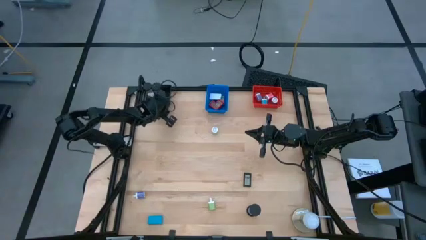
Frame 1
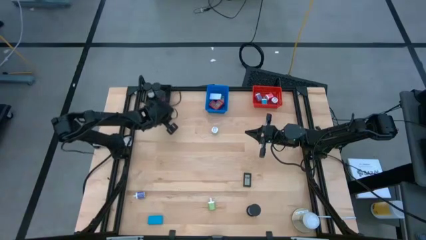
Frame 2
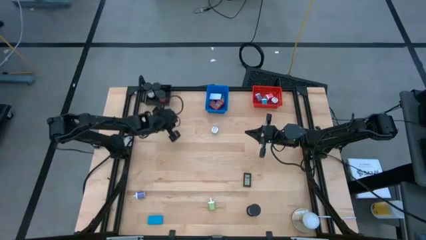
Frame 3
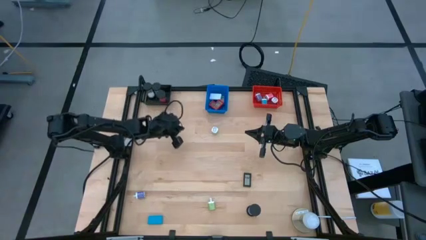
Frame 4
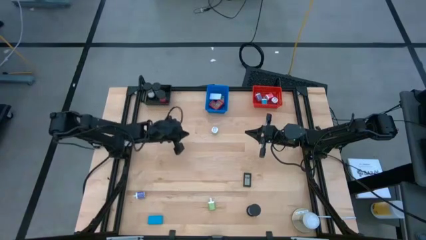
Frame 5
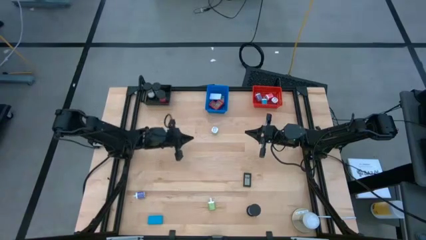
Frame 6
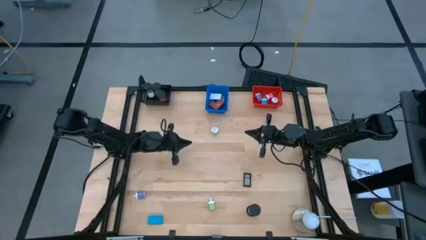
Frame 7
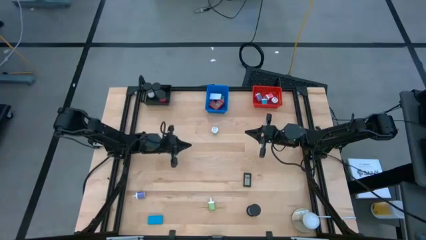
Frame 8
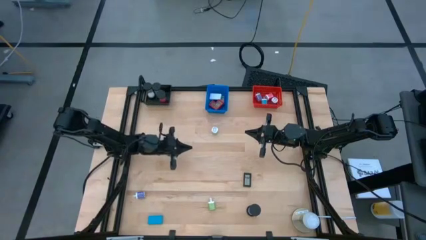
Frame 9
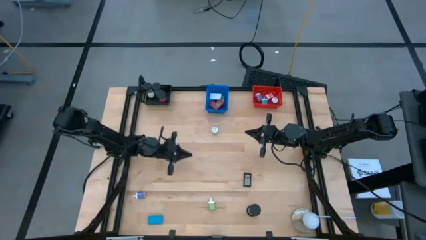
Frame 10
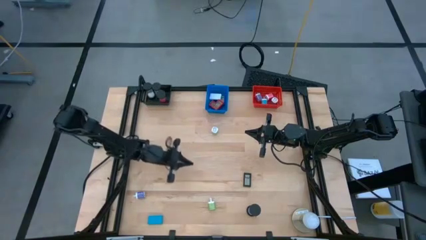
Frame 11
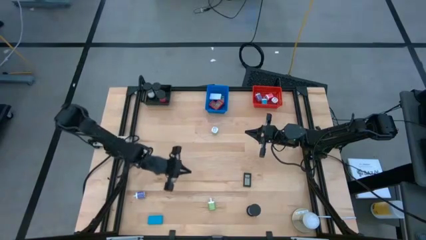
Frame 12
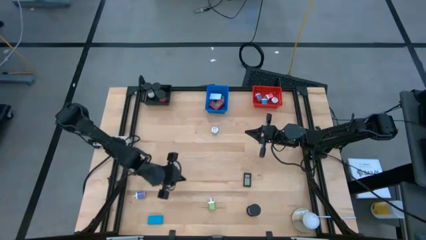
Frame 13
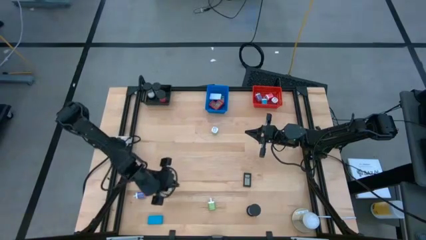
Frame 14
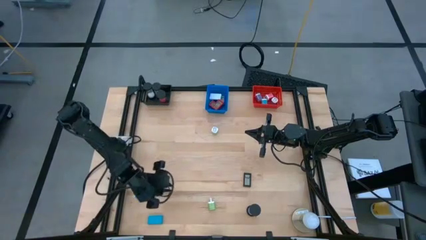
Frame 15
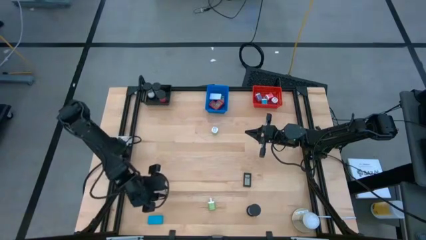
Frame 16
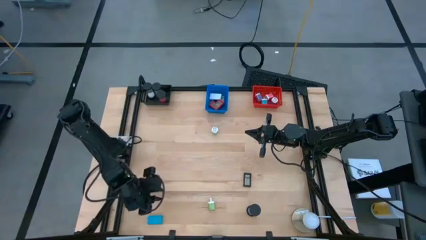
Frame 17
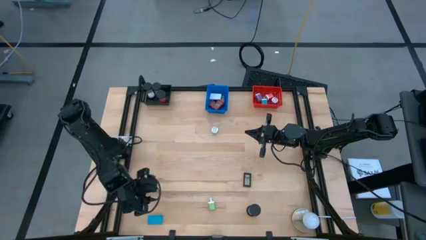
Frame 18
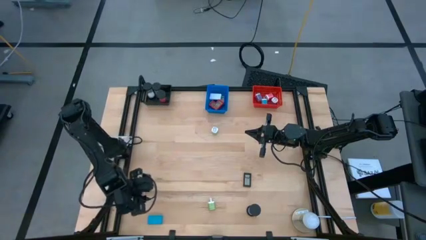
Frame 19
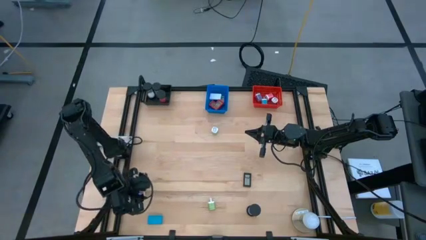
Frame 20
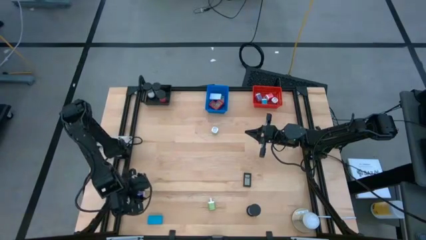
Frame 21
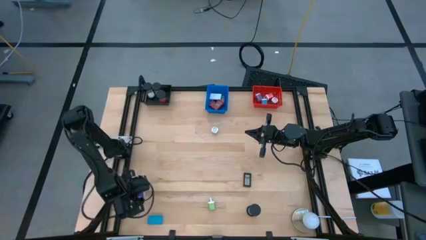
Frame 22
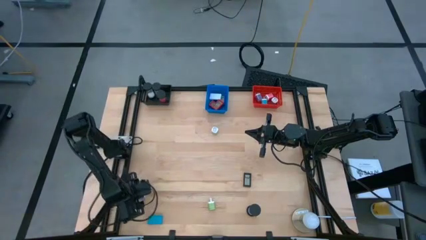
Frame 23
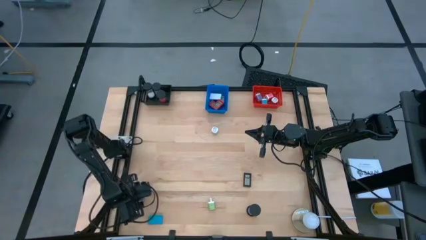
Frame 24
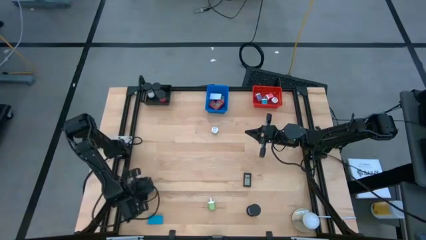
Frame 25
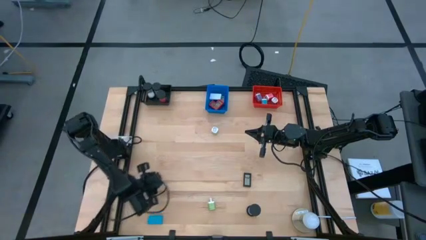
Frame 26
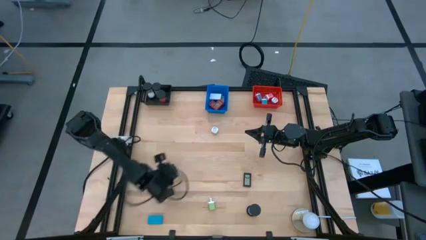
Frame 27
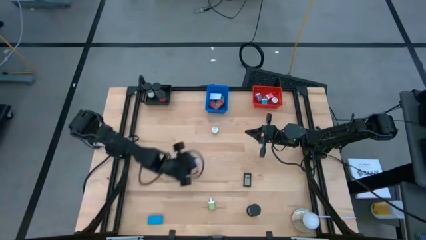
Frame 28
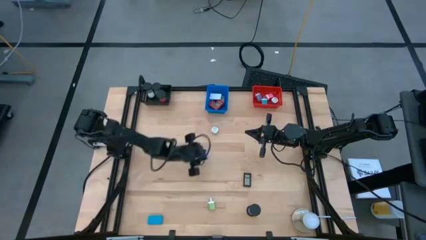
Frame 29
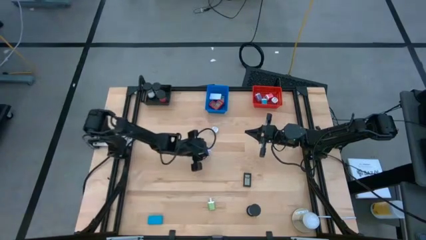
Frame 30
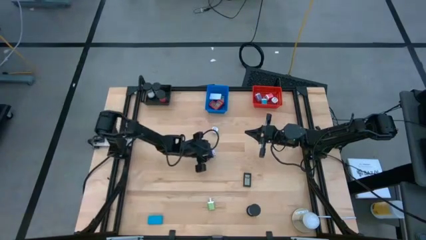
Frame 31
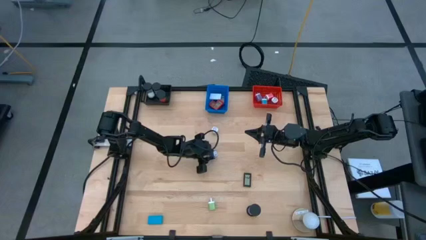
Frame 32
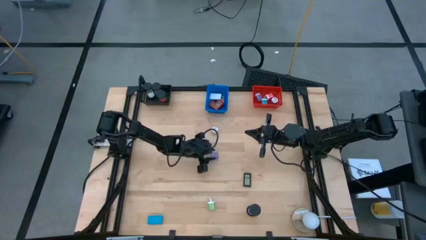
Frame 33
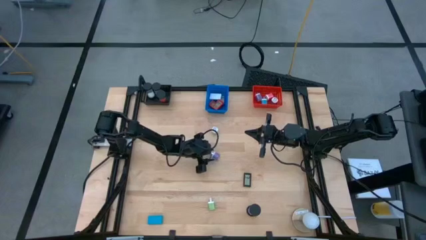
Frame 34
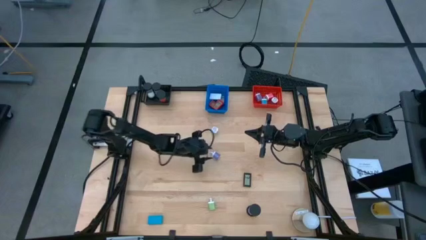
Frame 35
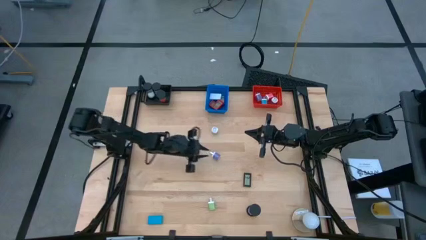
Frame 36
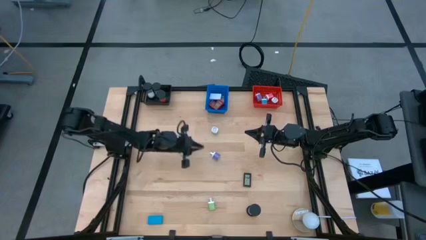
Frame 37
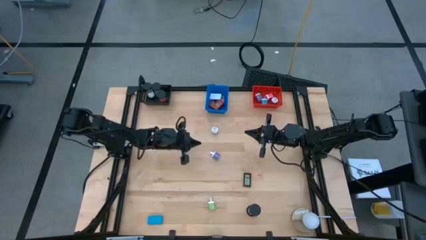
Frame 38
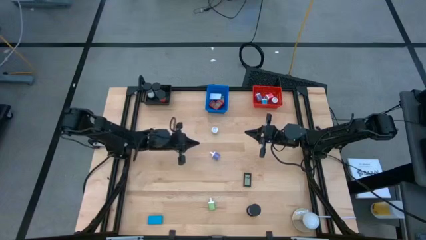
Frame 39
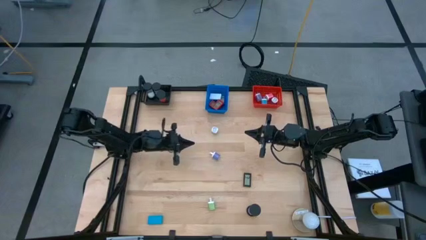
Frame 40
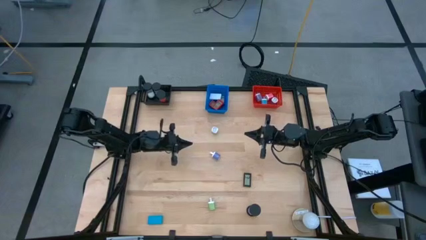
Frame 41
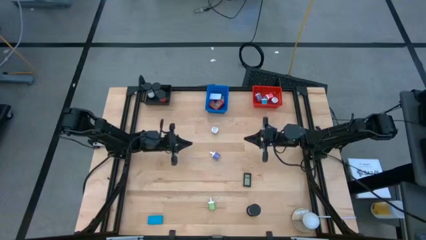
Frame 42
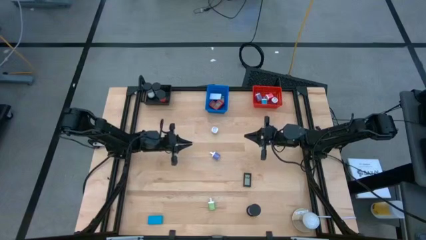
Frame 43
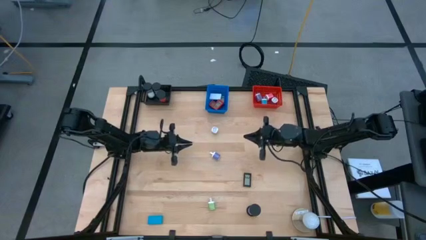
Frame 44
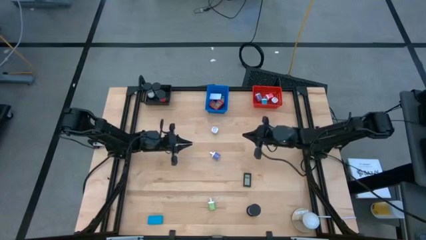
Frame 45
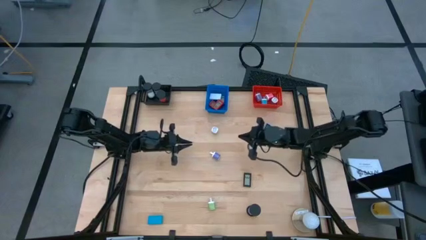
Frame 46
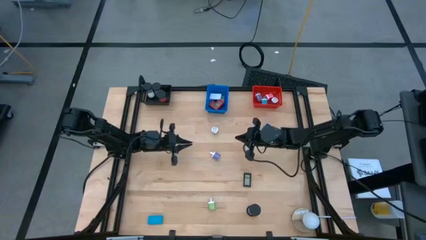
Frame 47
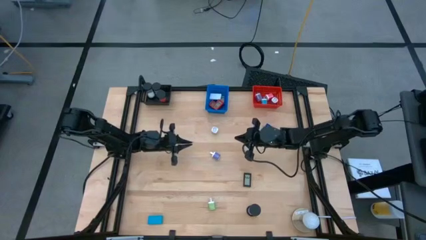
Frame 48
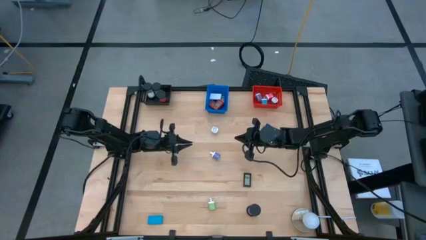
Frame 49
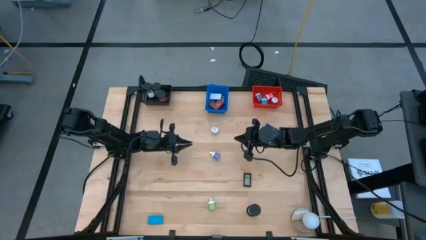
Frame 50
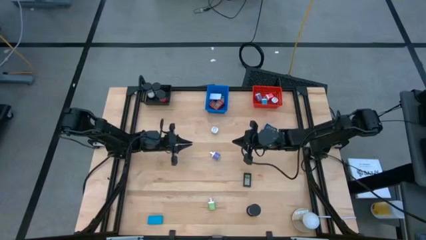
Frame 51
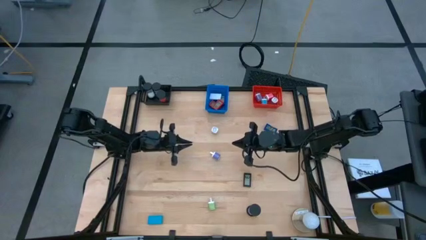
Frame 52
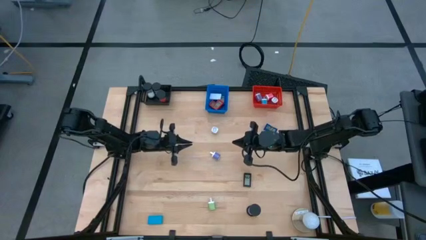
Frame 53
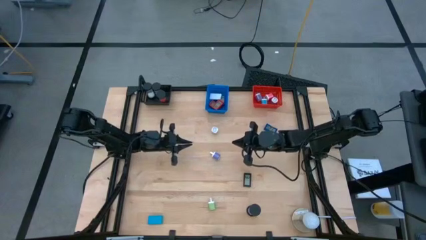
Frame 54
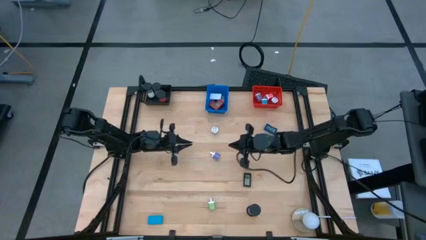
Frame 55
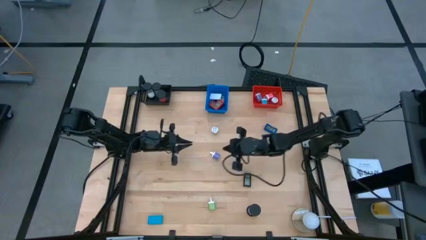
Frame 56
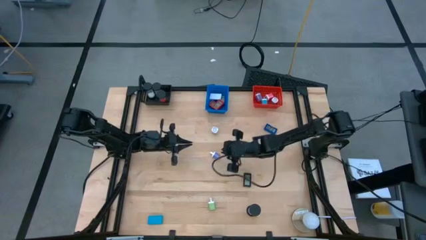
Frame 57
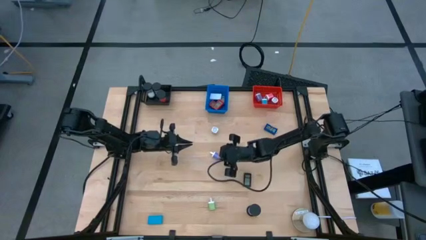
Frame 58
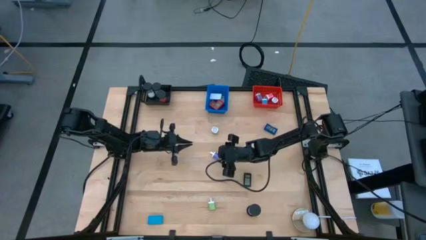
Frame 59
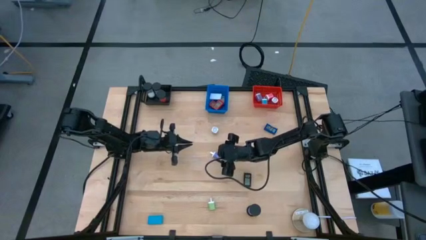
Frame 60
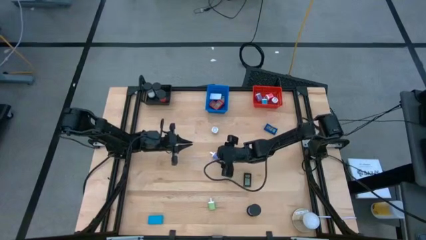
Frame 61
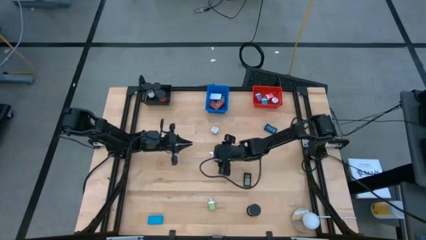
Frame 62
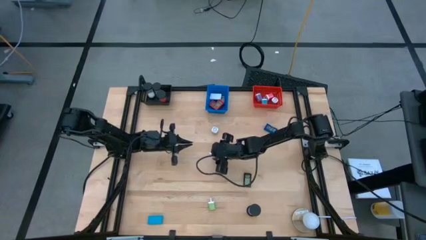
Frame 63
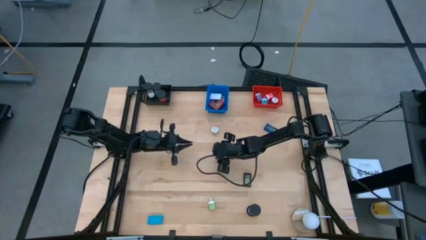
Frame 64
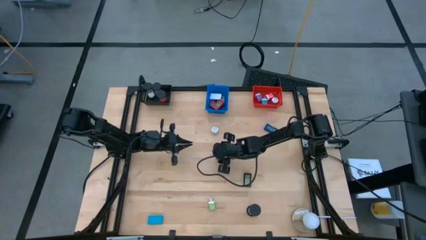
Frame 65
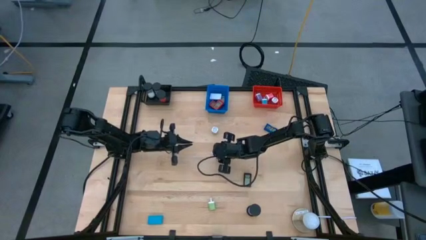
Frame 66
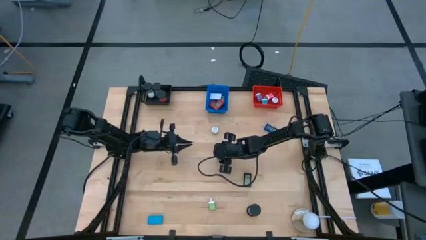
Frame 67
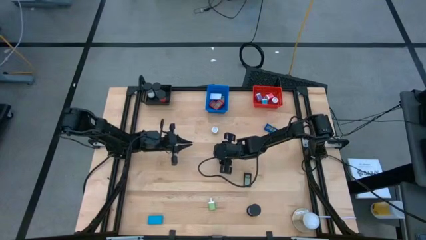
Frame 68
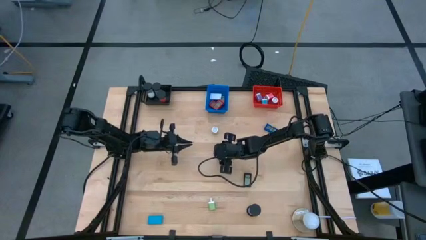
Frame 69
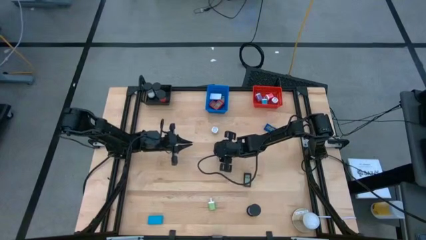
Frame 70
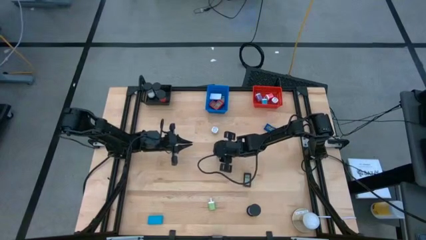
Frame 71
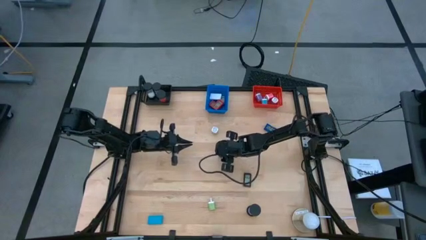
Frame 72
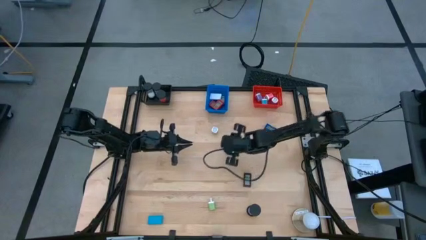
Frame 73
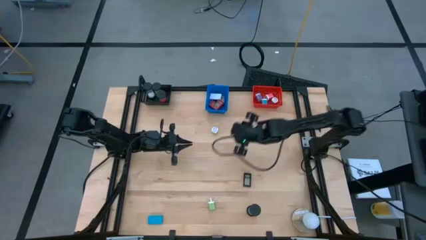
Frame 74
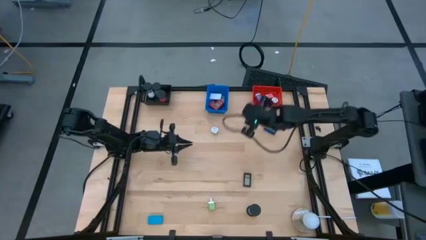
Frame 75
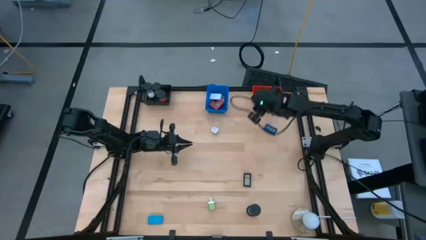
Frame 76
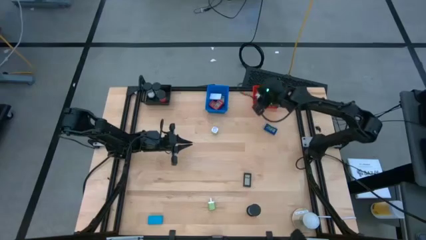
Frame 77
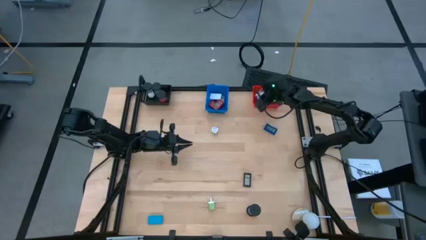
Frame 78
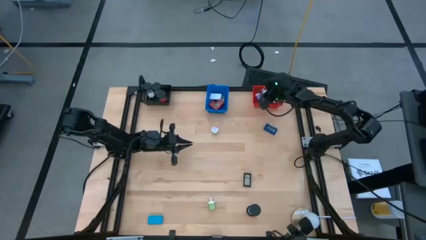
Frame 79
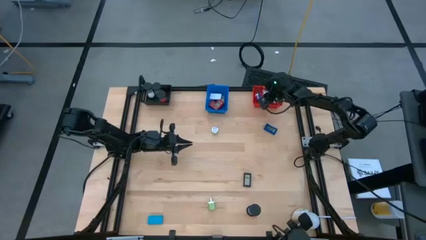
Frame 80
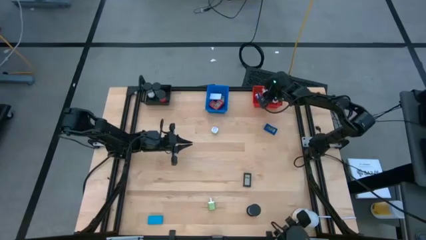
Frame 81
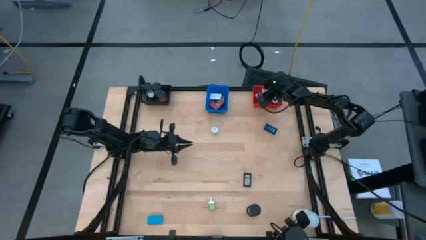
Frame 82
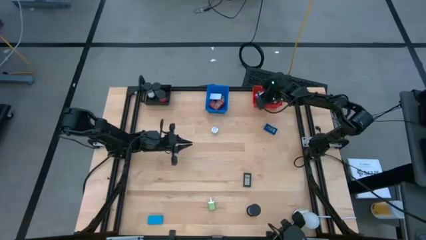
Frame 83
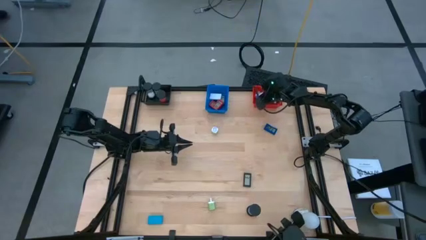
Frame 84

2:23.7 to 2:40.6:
Task: Pick & Place Office items
Put the purple charger adapter into the red basket
